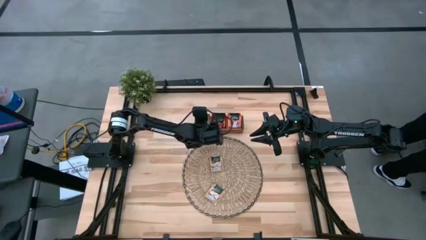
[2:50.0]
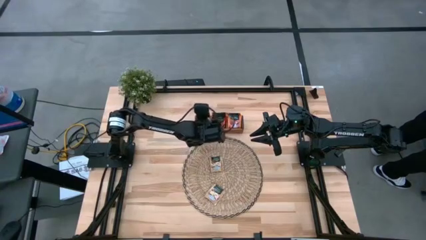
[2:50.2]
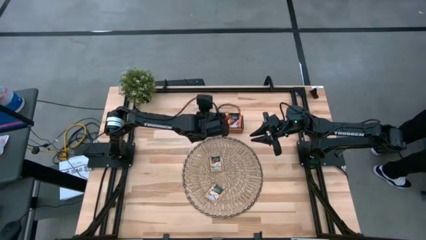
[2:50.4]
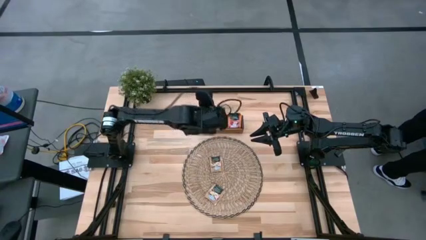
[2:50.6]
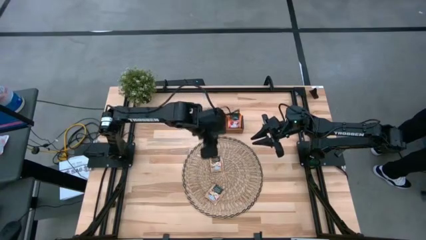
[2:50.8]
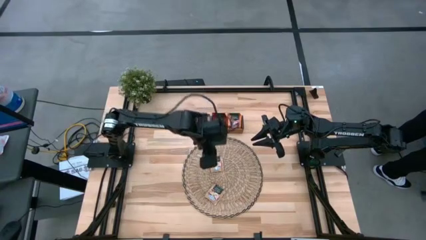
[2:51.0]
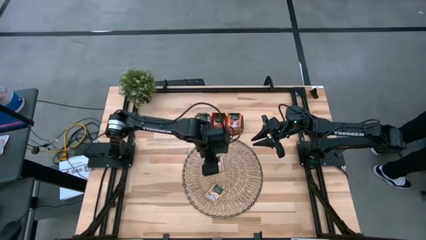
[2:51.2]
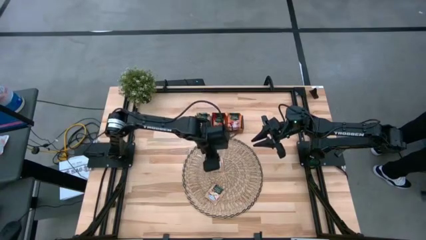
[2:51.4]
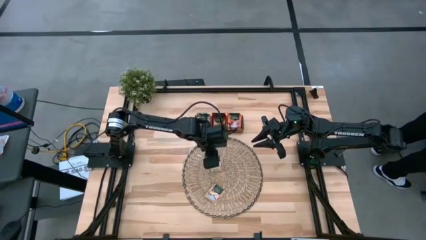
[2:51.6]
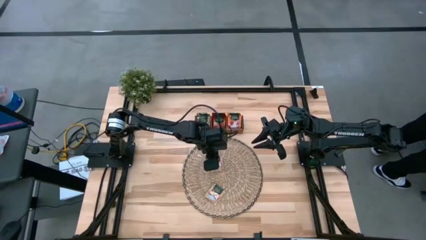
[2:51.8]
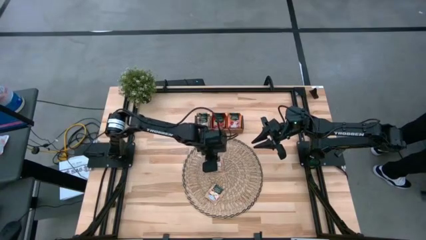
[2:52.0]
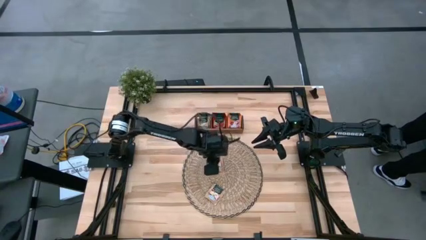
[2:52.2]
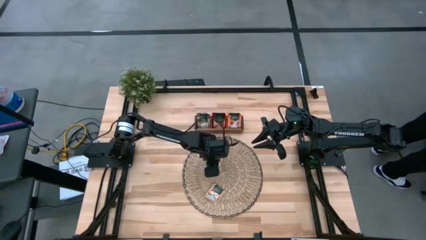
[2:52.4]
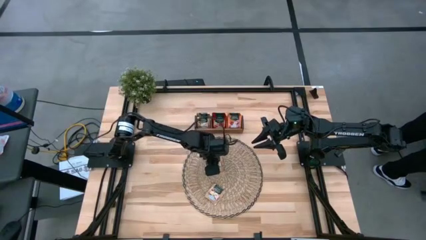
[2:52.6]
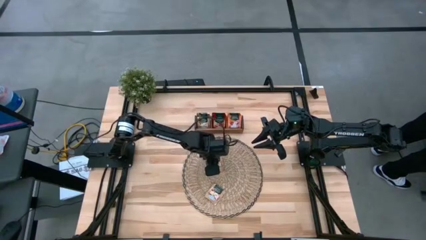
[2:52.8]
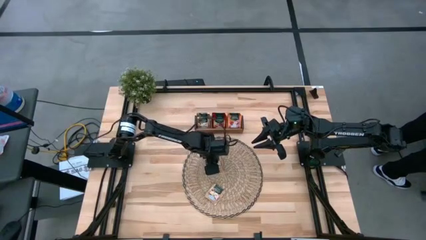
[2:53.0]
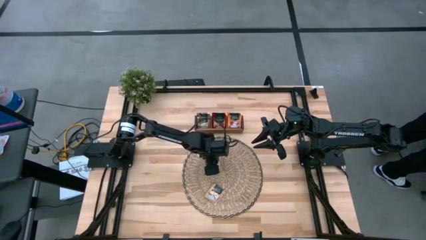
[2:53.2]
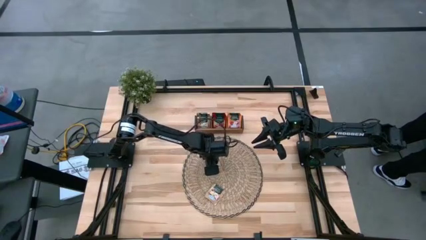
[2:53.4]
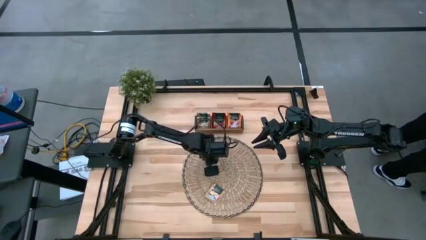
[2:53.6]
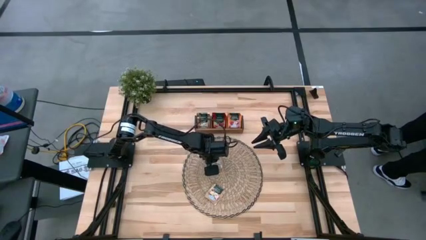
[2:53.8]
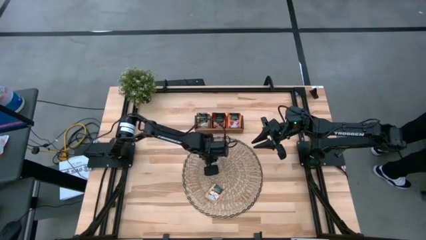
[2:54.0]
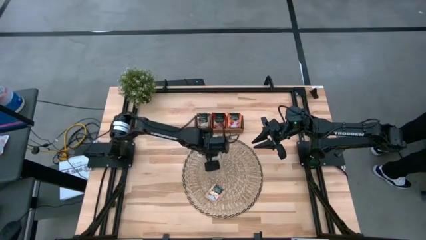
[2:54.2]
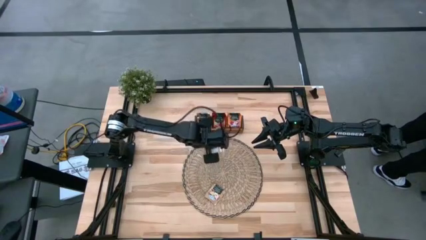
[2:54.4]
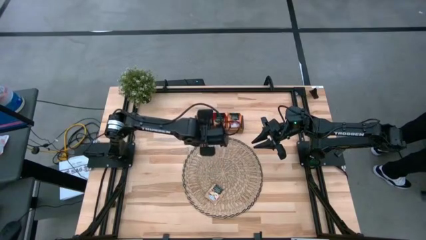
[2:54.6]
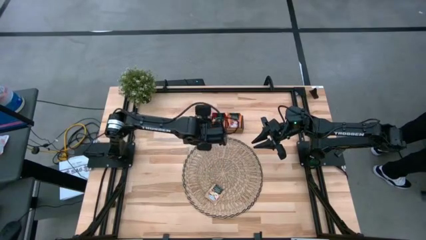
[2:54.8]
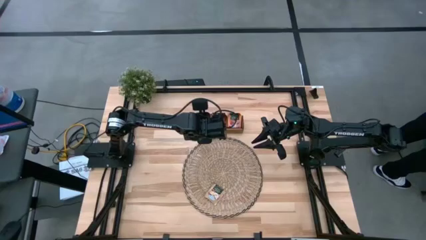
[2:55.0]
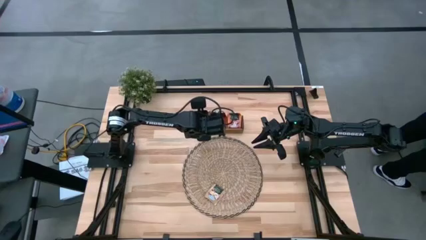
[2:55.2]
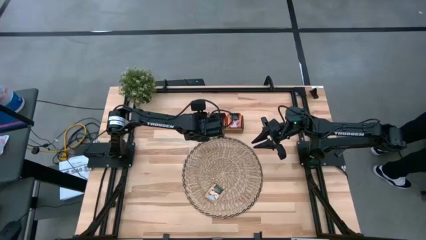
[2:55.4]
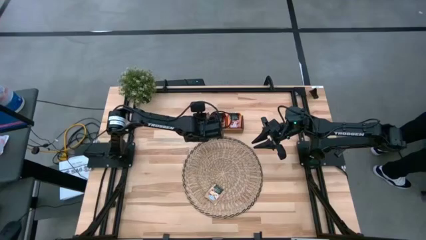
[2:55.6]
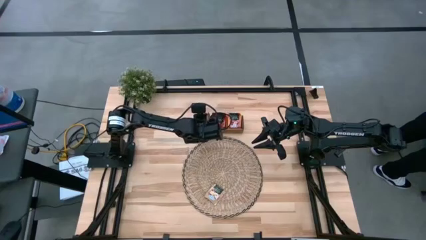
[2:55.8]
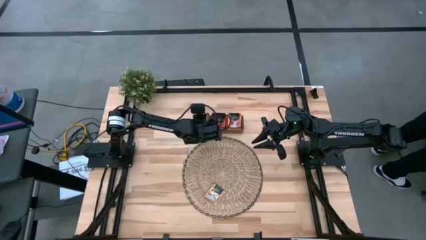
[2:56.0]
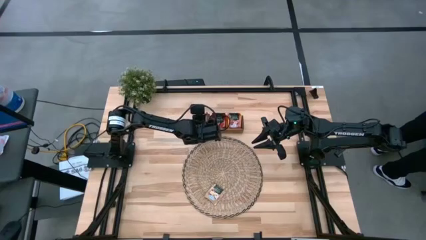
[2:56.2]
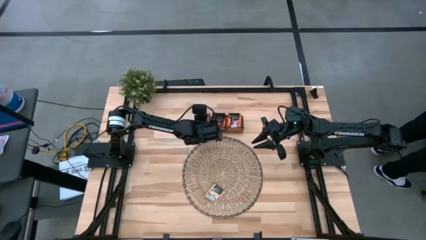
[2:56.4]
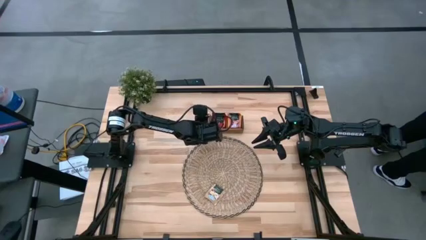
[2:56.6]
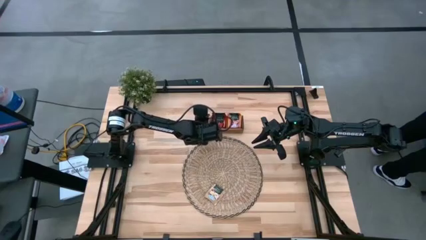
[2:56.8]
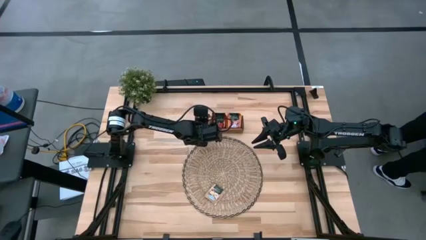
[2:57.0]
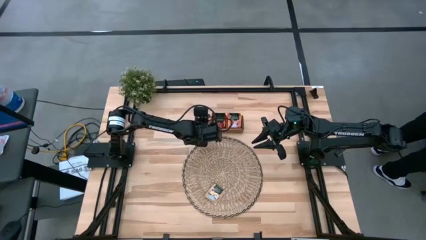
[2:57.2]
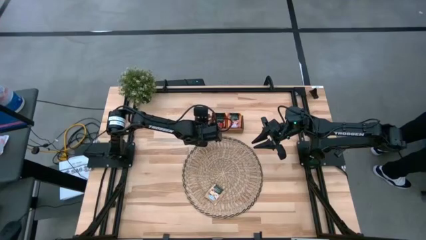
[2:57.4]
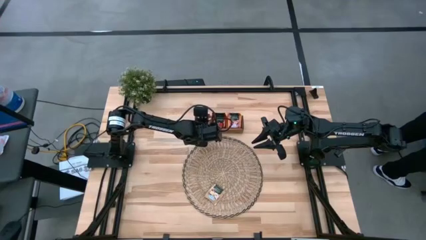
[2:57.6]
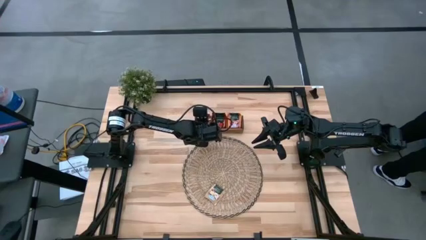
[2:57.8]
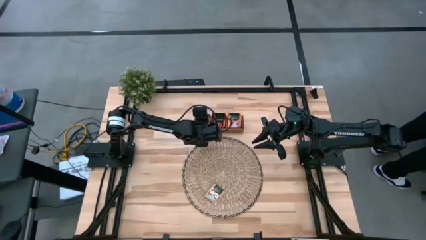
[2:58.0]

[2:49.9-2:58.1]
Task: Pick & Place Tea
Put the green tea bag to the left of the wooden organizer

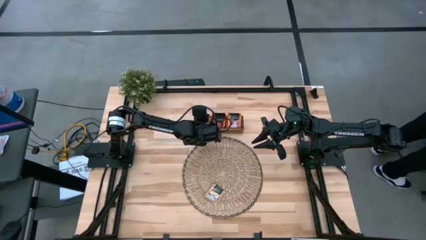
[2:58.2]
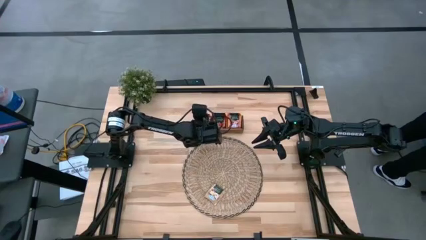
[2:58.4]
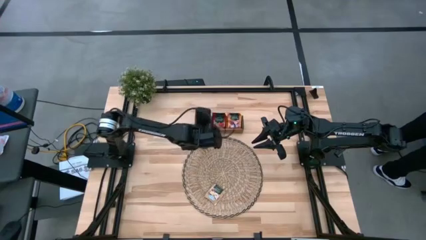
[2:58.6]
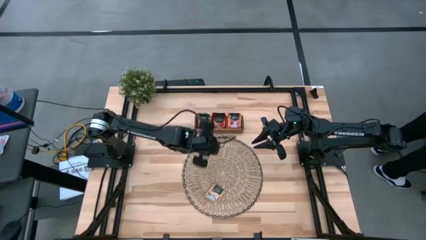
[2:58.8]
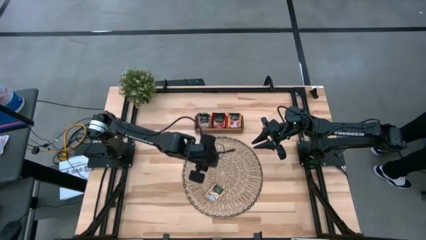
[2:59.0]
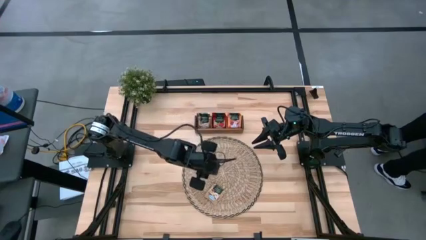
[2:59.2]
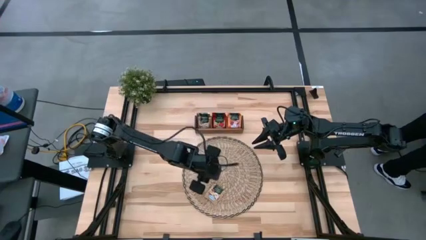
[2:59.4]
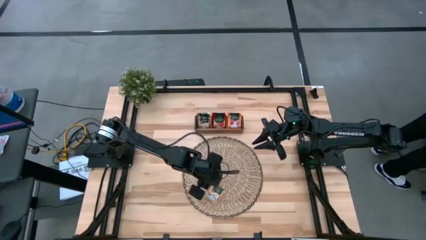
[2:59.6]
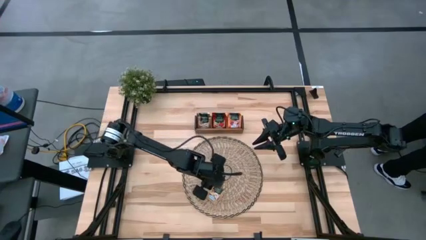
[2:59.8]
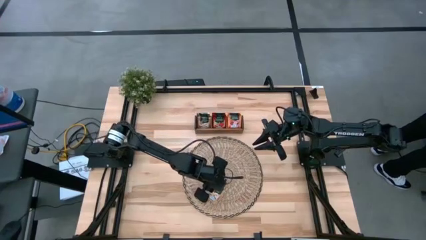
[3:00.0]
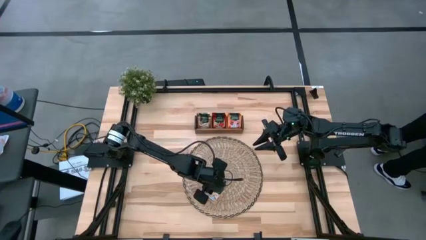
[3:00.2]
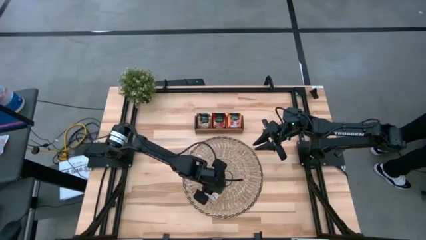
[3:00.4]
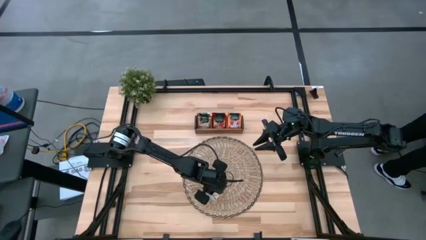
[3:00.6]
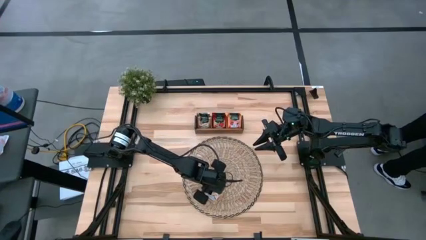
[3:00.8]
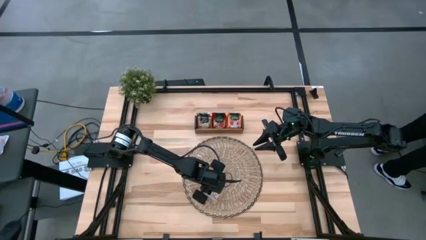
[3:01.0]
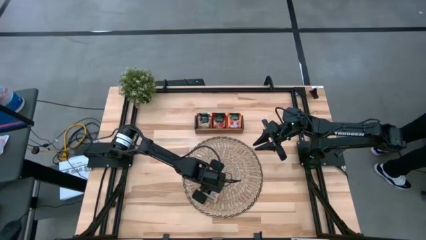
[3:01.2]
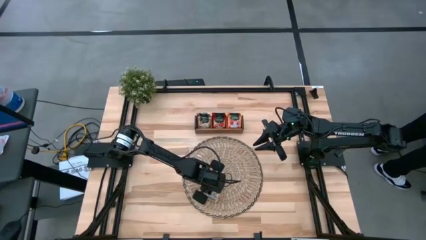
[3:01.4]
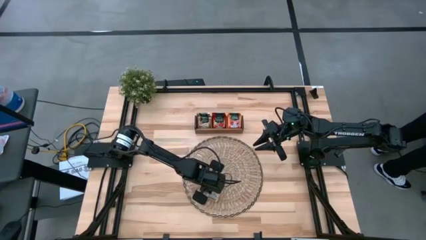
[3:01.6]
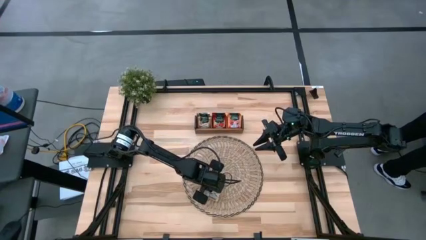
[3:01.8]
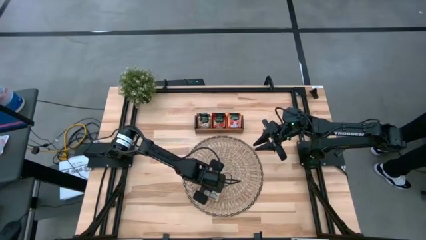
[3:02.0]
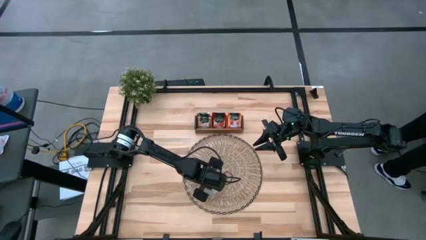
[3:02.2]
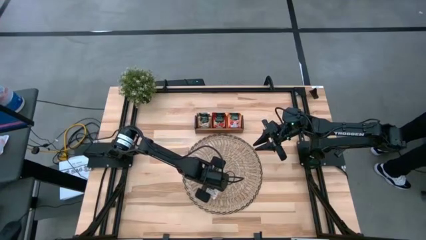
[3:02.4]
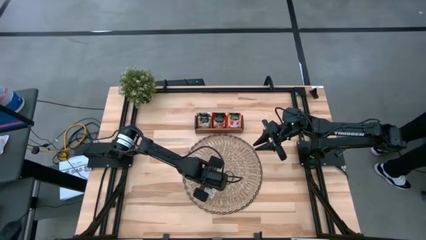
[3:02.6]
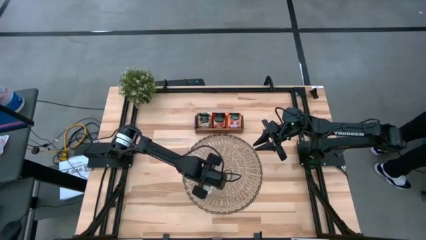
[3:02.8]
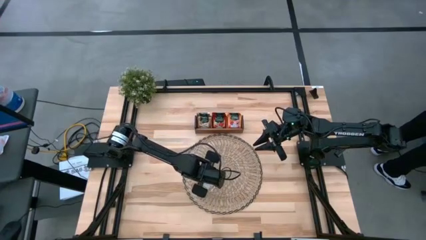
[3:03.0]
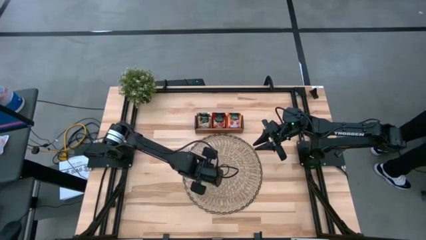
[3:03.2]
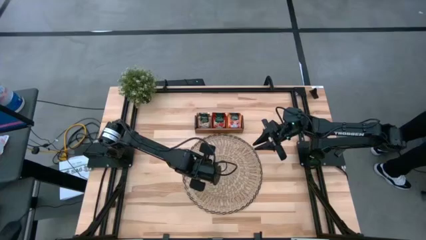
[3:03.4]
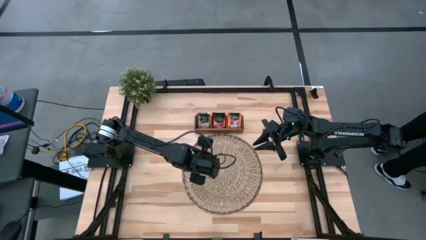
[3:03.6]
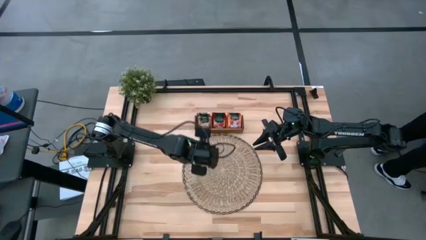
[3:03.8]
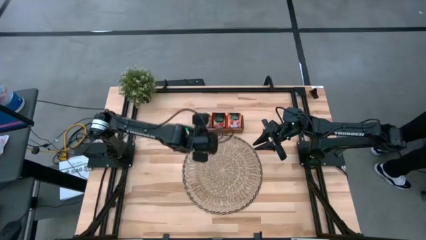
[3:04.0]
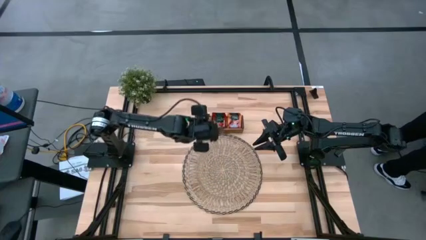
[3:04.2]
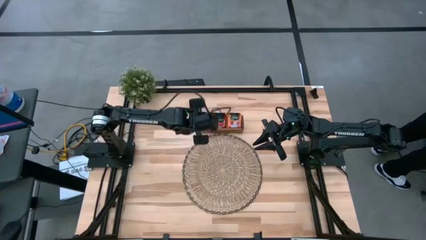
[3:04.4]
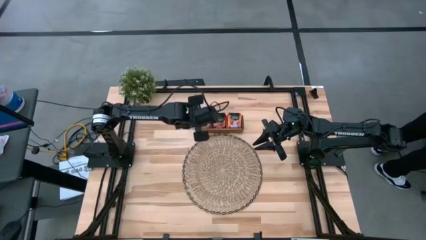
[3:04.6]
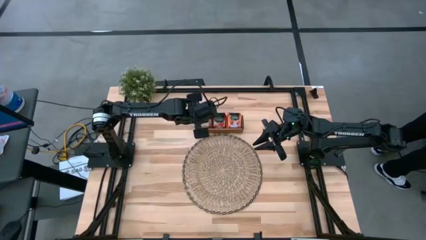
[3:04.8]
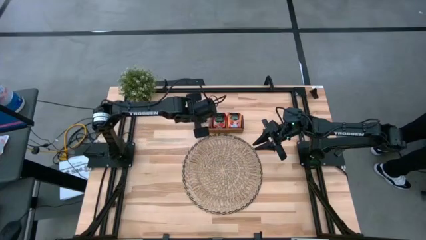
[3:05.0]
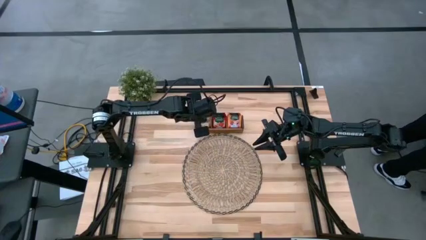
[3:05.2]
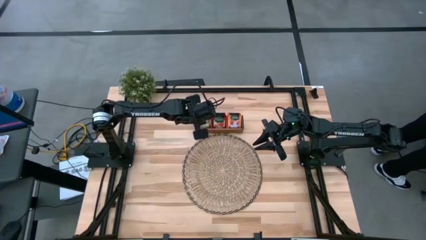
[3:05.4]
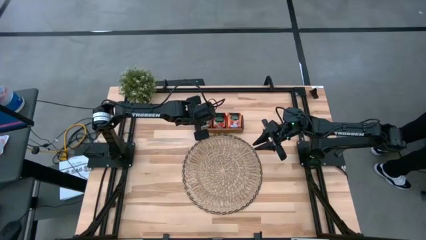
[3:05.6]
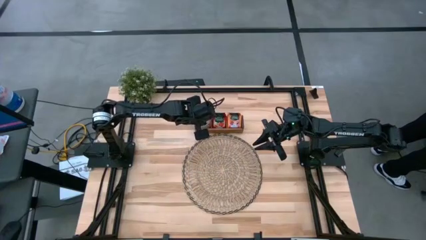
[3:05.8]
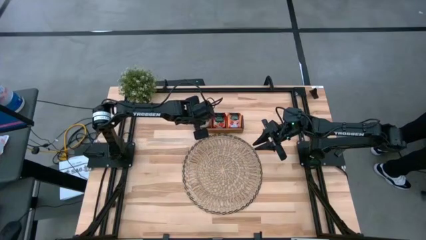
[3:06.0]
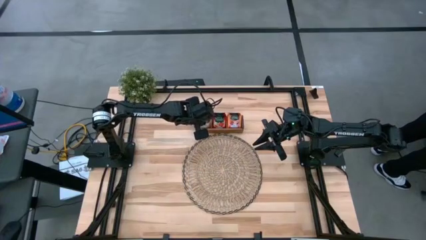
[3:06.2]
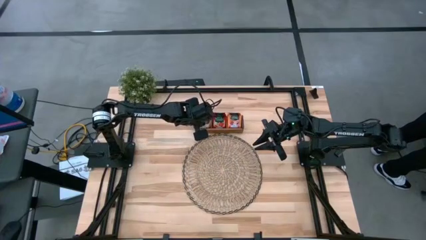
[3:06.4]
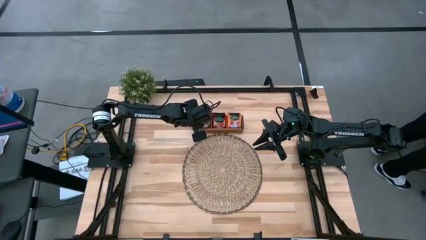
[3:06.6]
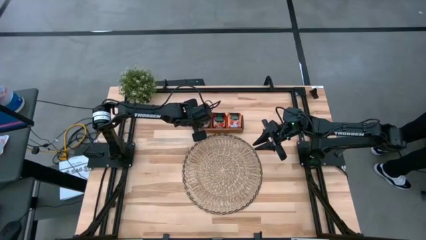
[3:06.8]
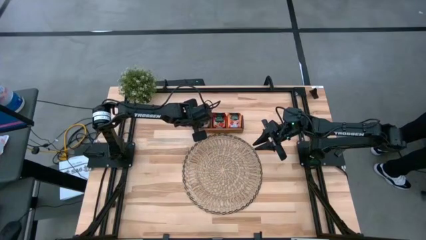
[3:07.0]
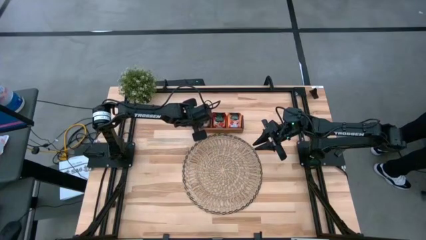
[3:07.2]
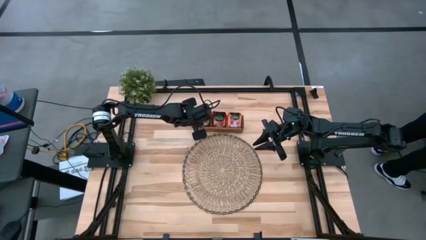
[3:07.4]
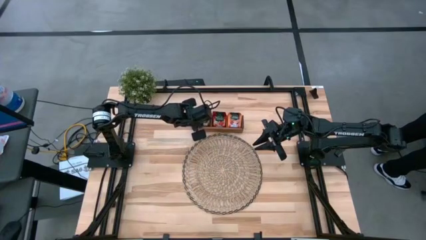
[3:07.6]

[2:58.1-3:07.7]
Put the green tea bag to the left of the wooden organizer
